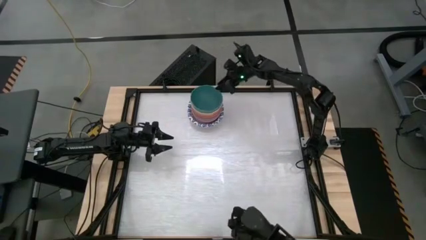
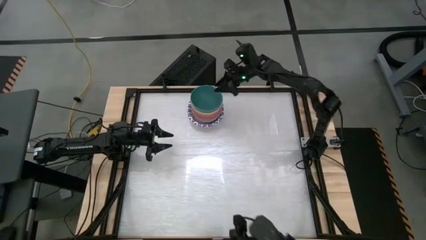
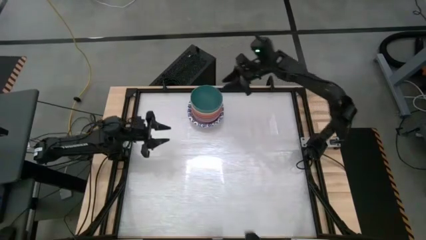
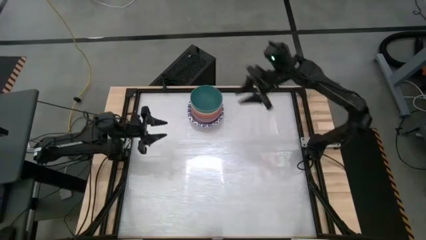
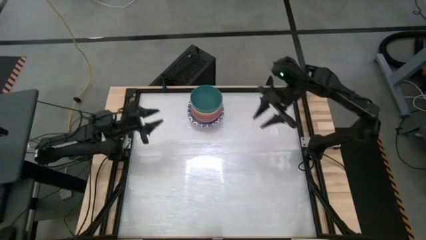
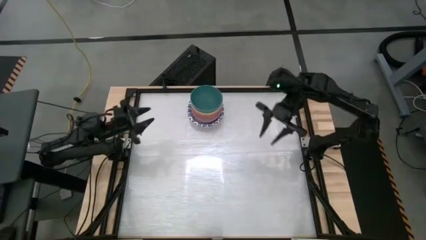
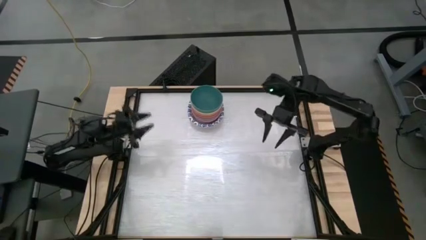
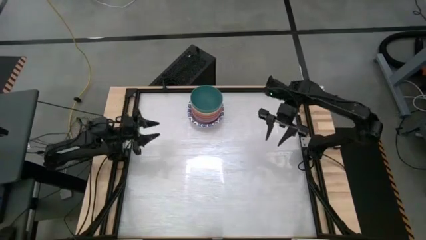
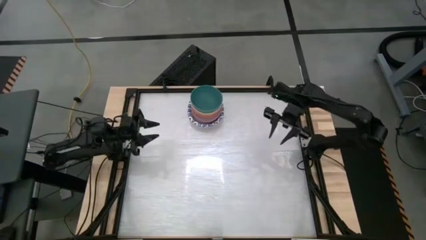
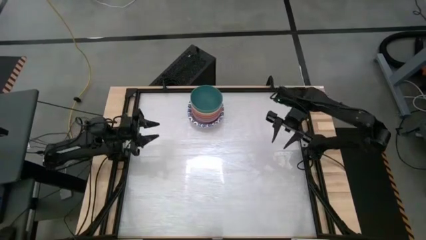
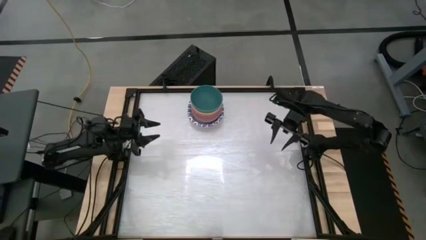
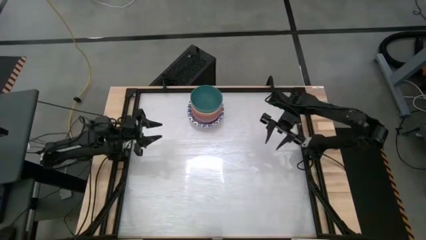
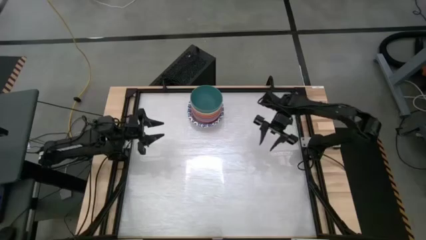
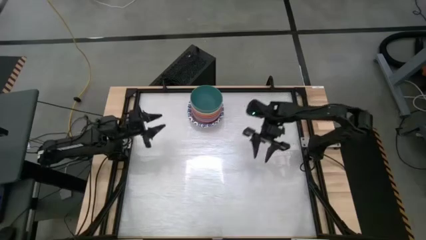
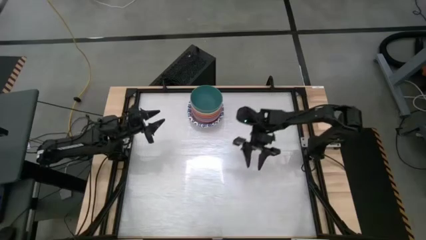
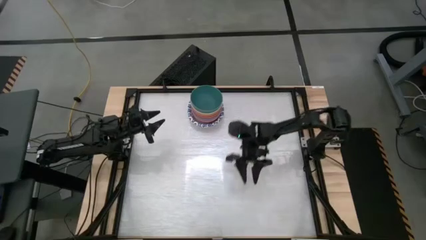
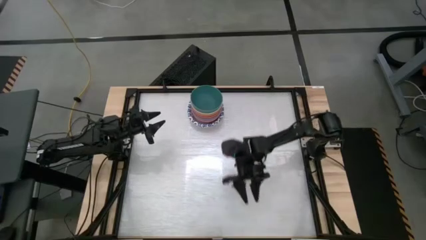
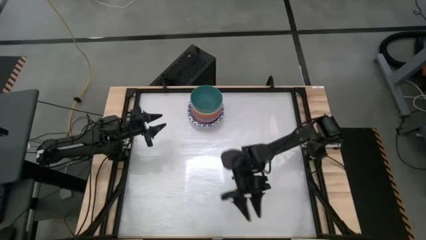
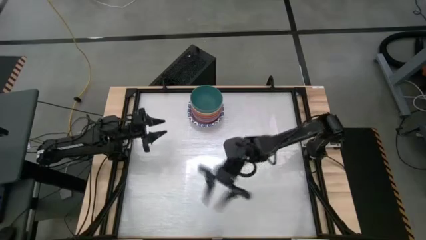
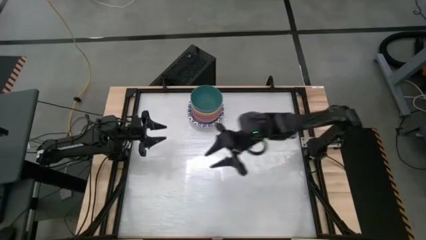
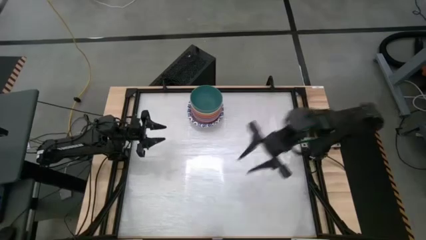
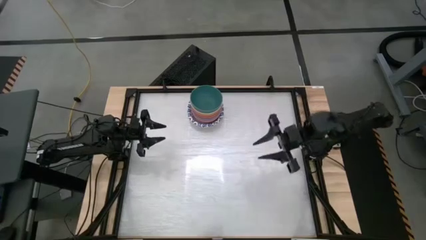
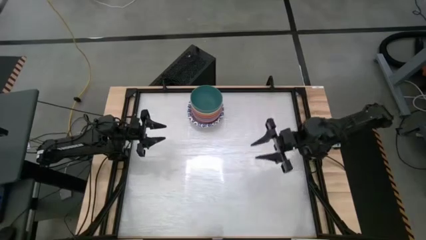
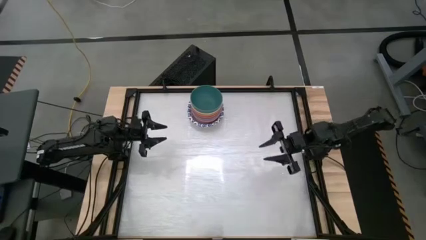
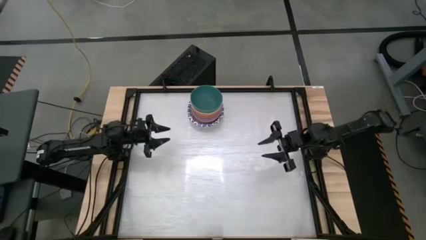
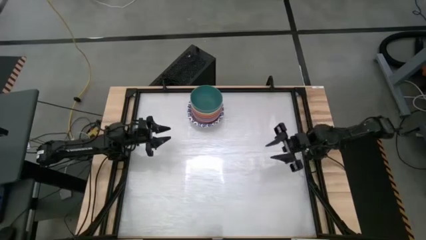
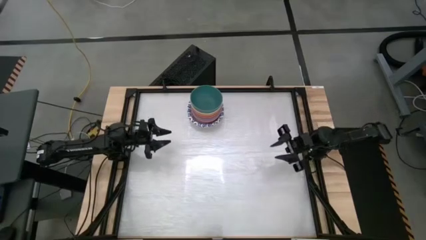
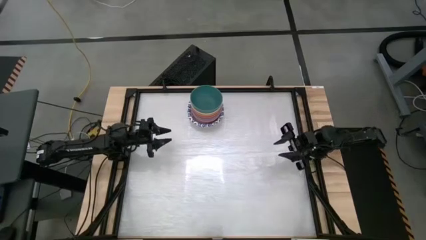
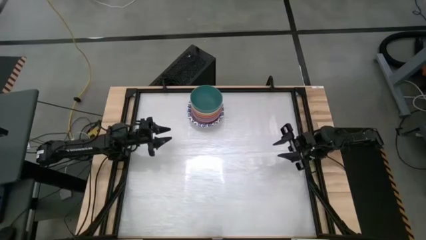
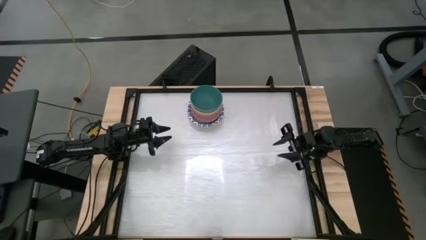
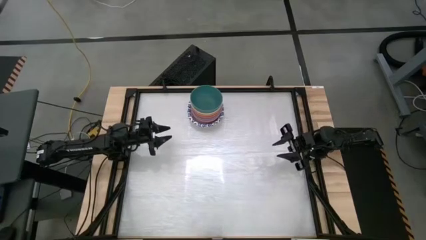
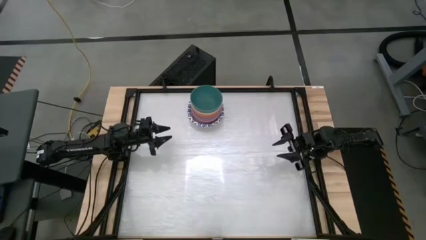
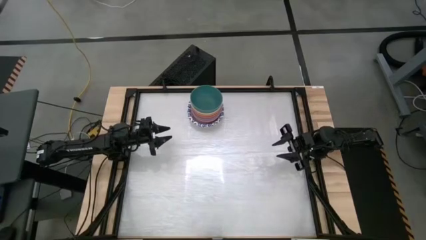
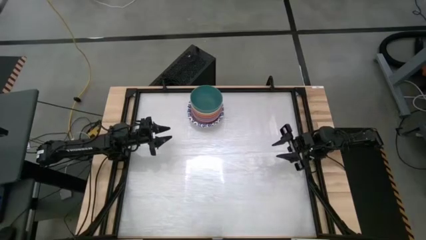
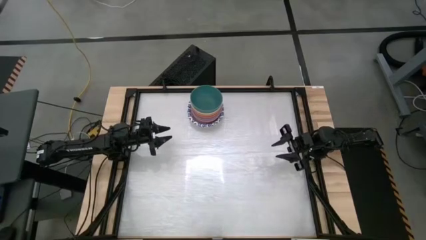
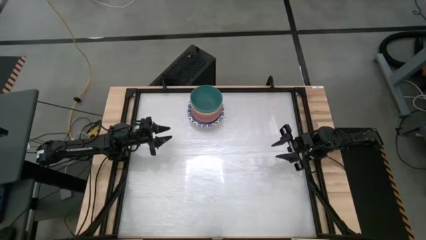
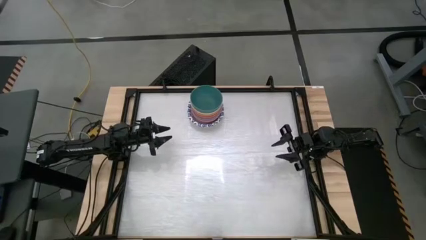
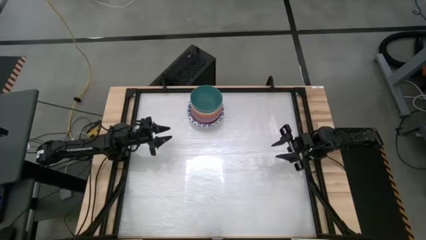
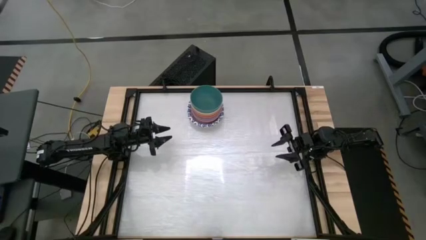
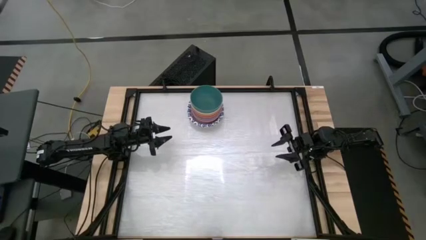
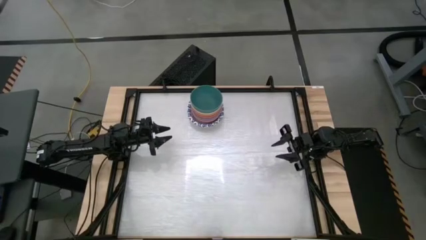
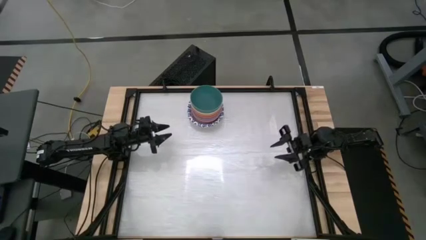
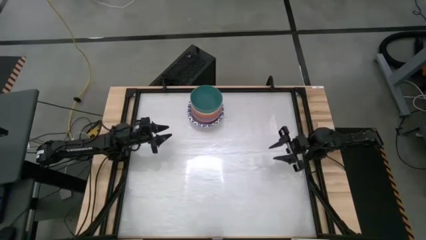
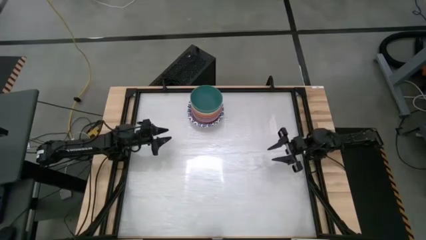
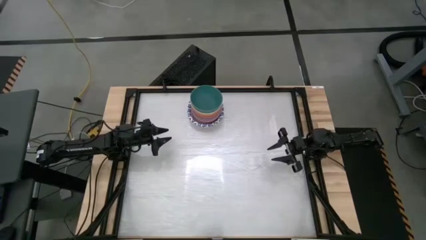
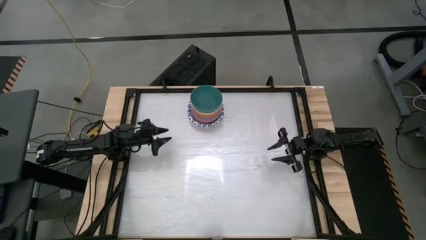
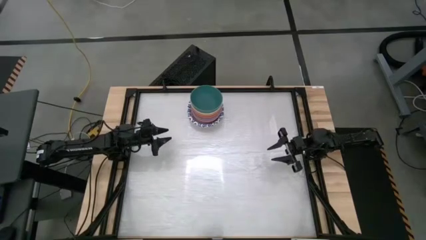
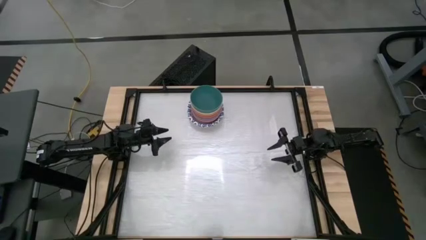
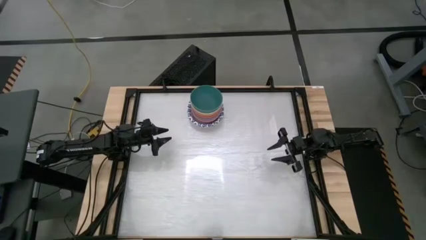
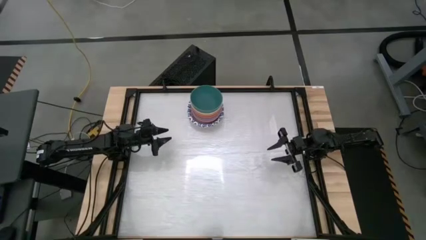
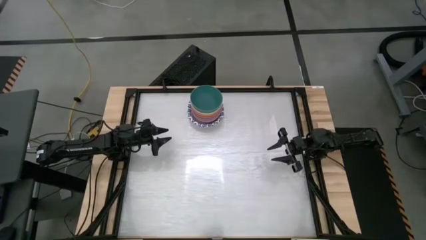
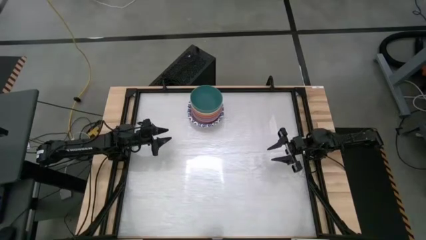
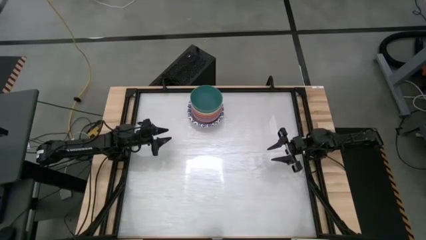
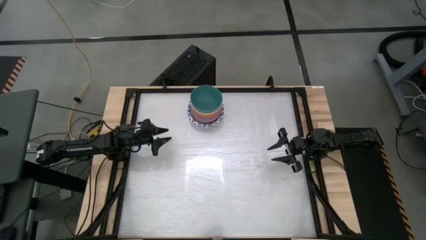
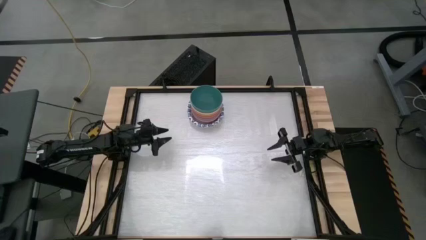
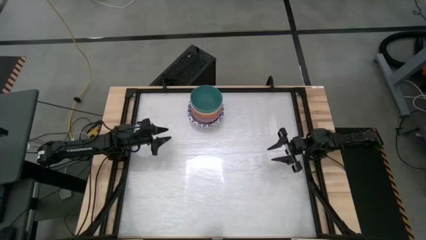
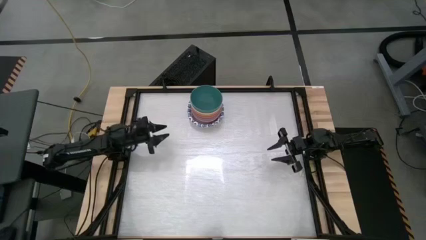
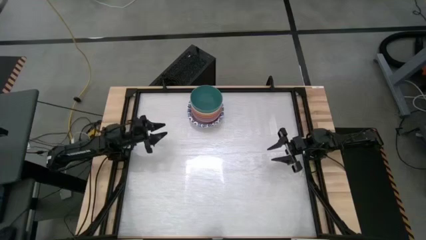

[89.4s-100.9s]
Return to Home Position

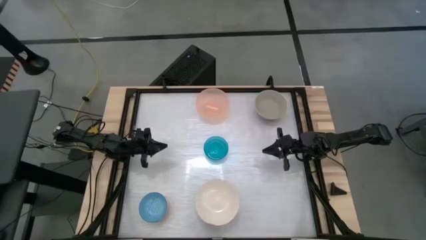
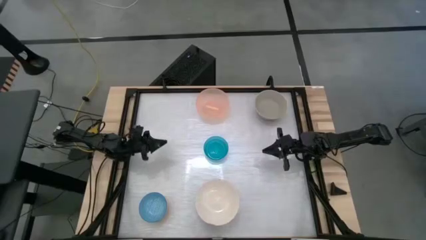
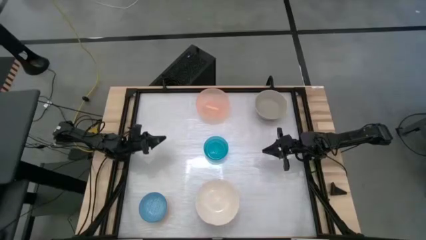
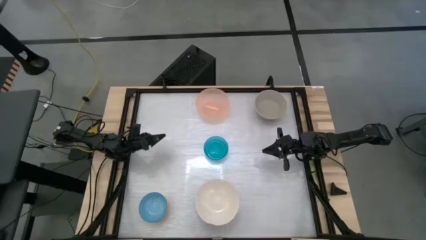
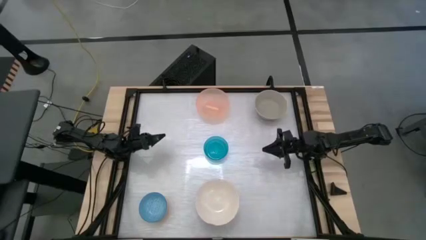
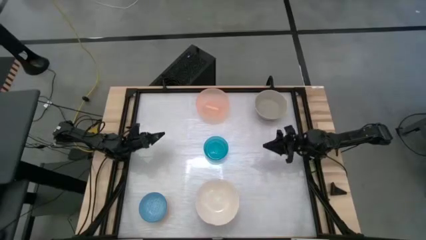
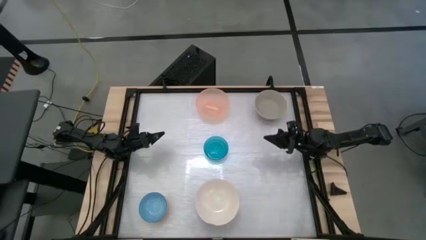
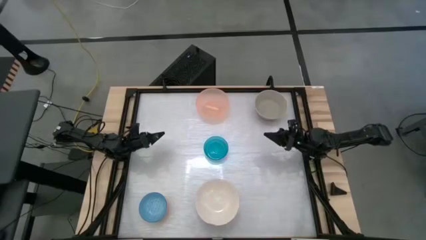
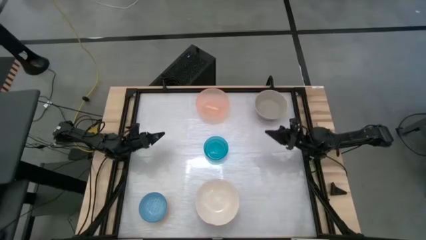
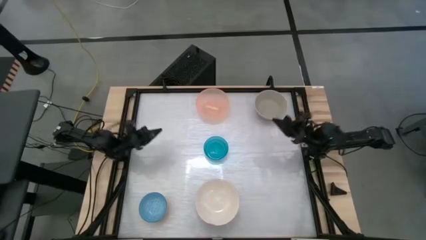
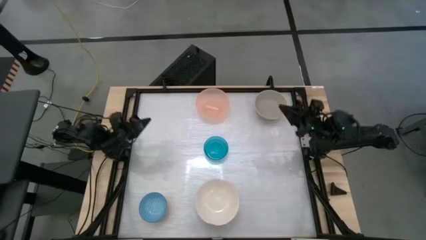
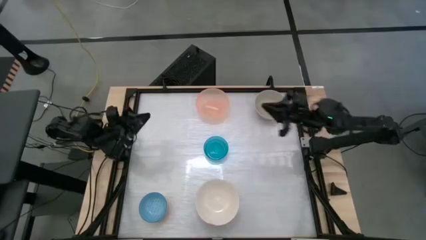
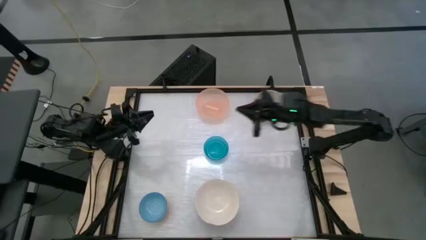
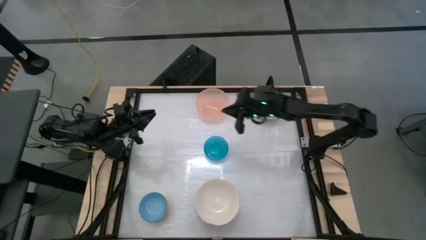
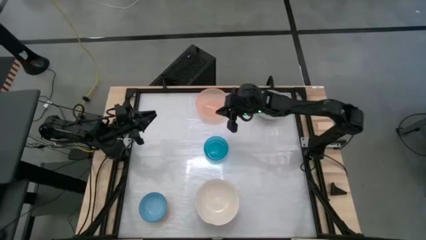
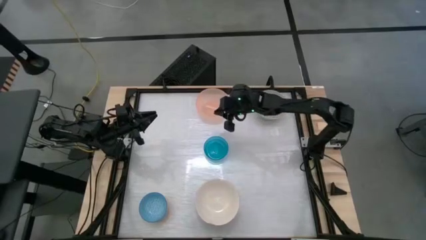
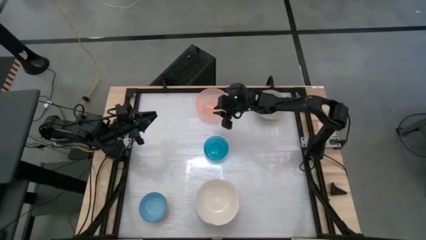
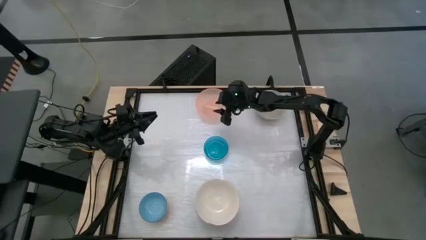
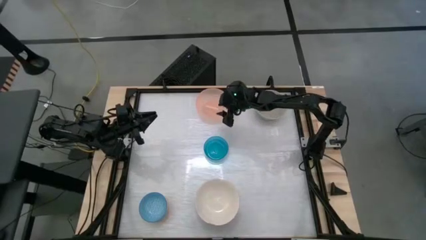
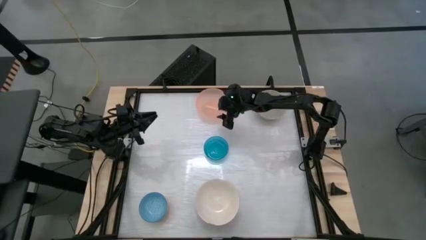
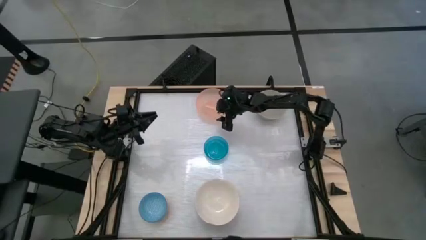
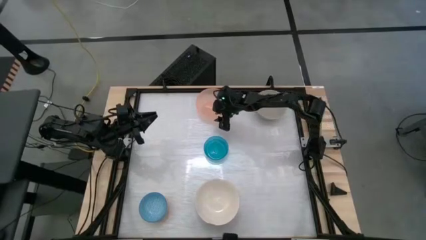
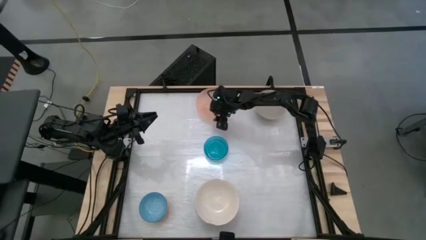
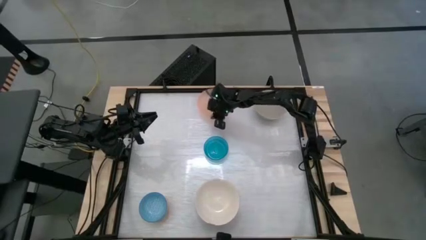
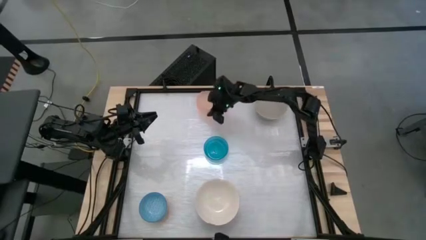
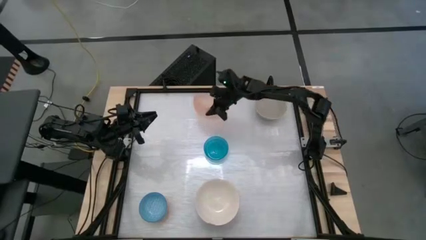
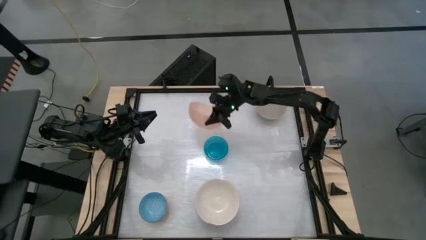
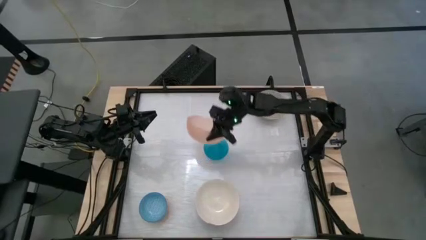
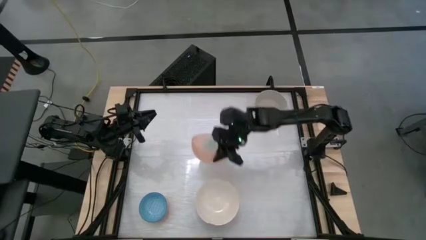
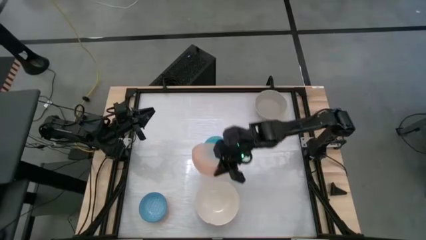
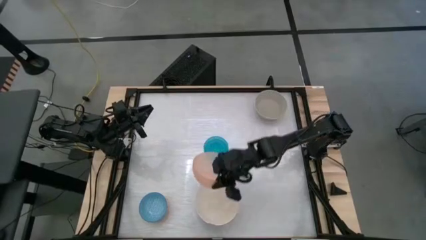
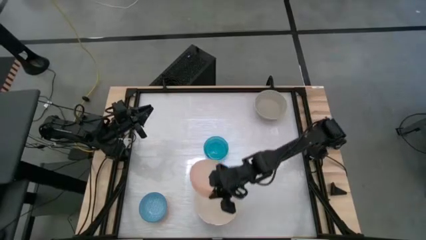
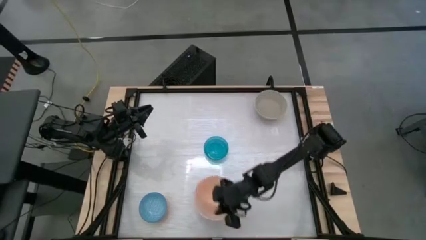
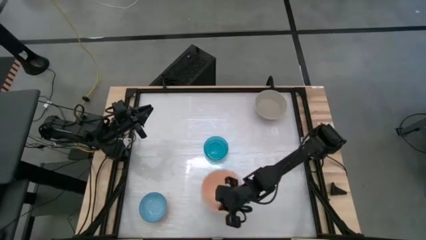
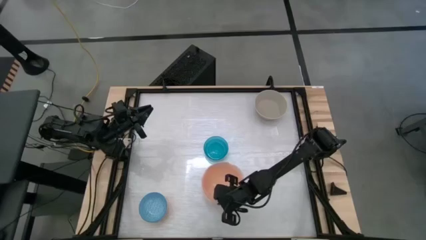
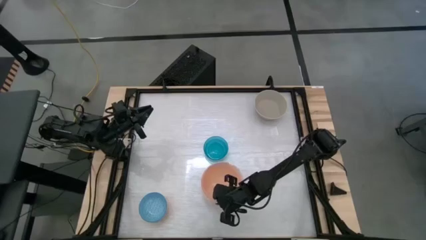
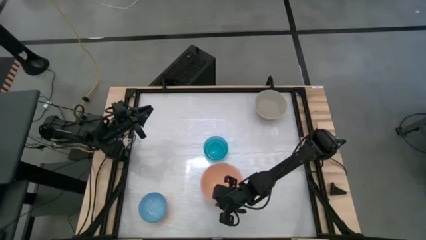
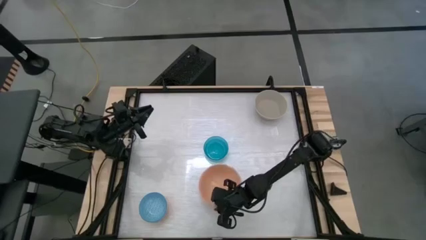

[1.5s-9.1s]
Stack the orange bowl on top of the white bowl
